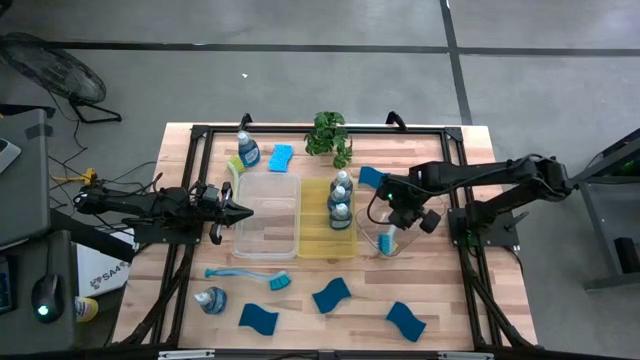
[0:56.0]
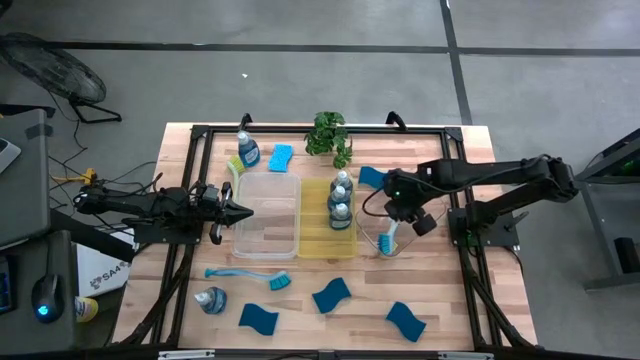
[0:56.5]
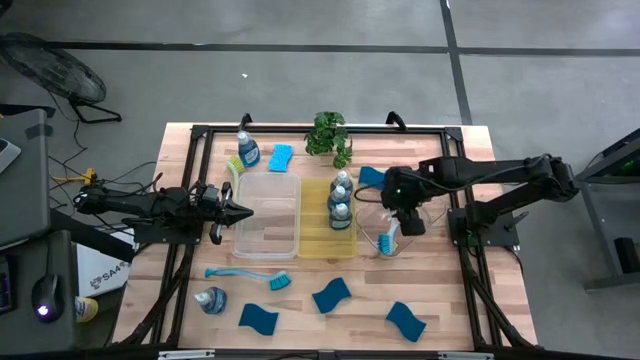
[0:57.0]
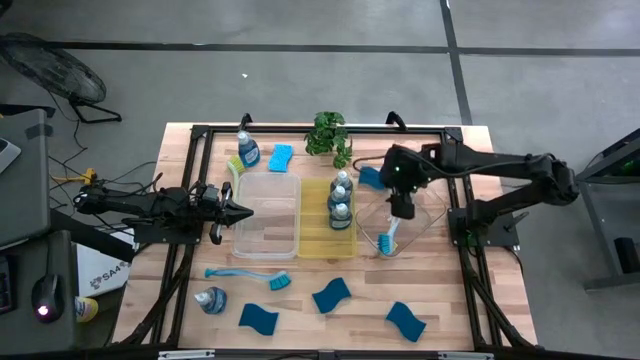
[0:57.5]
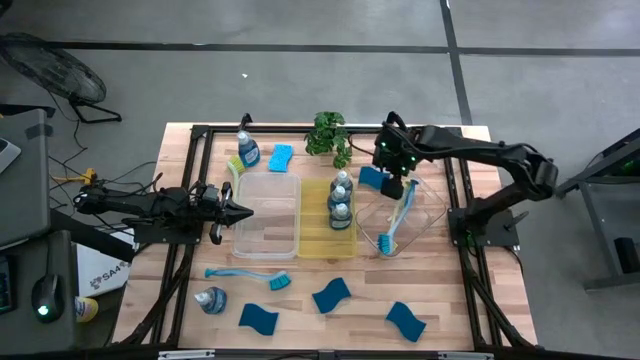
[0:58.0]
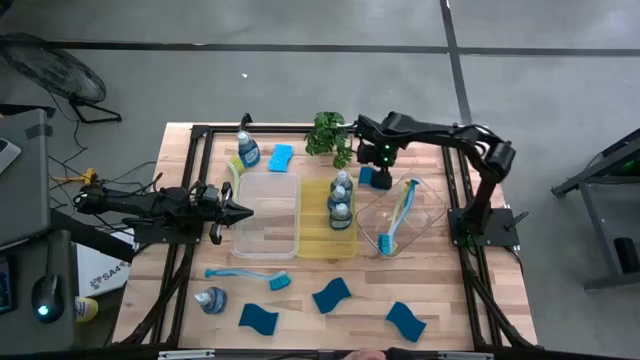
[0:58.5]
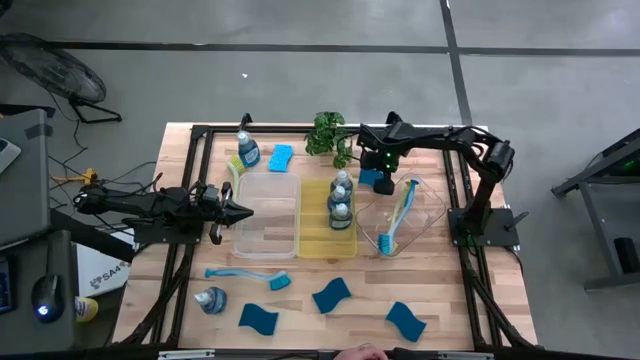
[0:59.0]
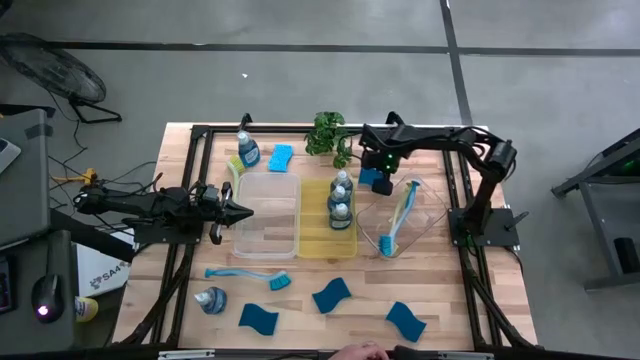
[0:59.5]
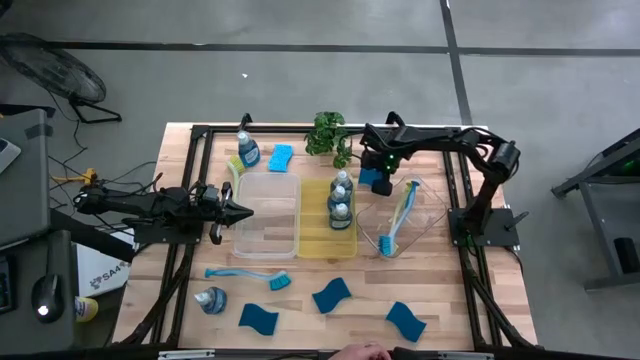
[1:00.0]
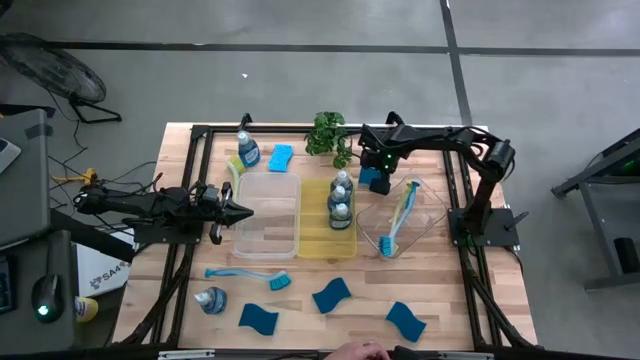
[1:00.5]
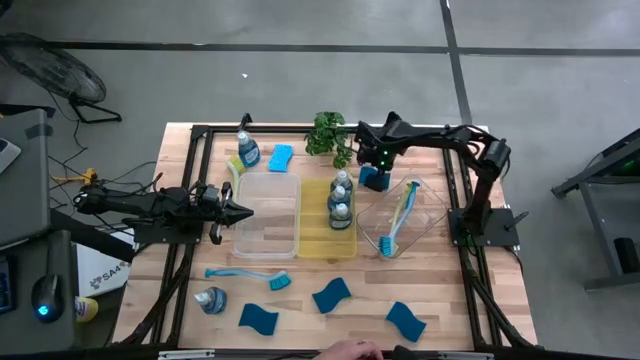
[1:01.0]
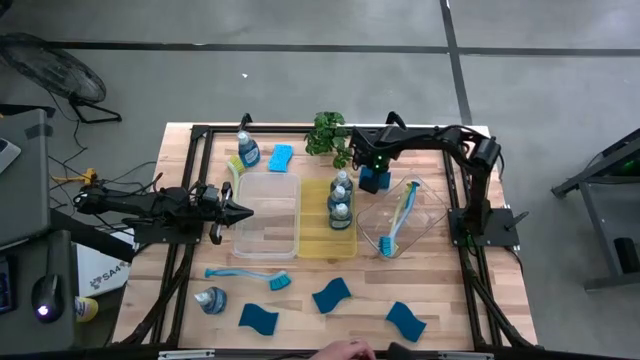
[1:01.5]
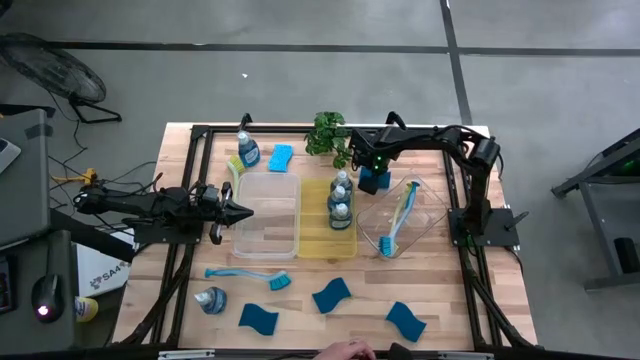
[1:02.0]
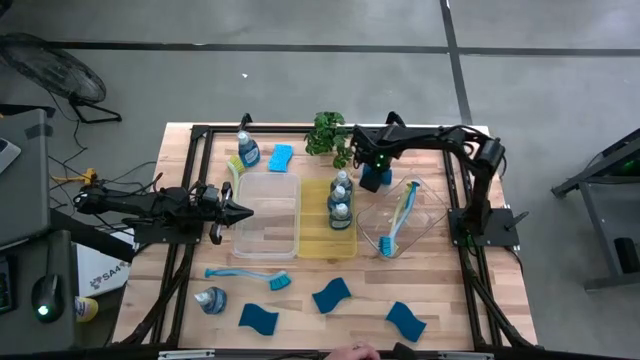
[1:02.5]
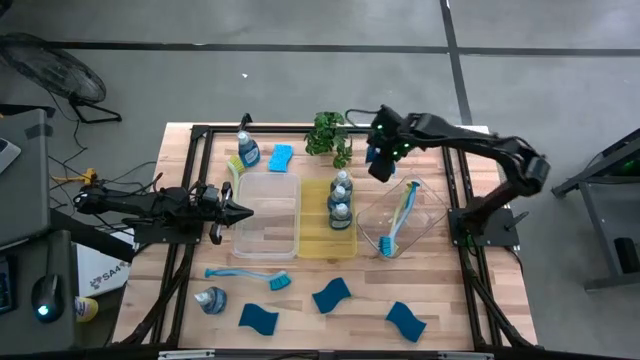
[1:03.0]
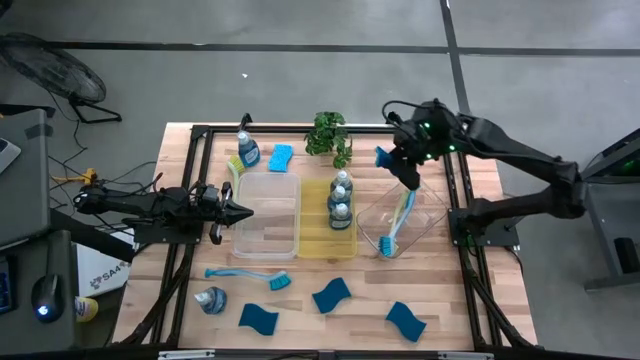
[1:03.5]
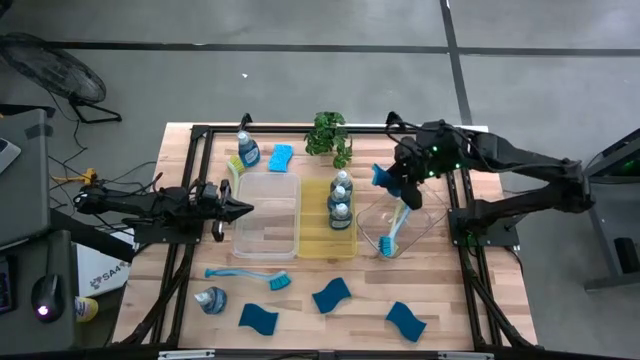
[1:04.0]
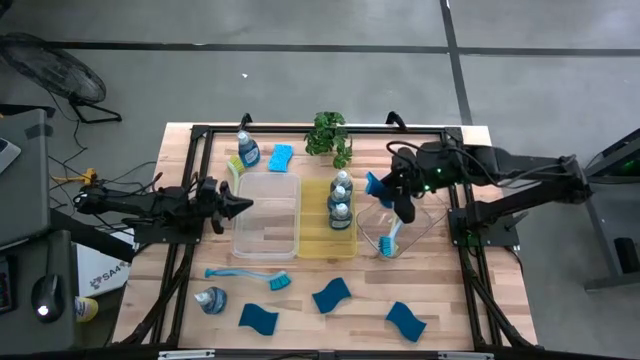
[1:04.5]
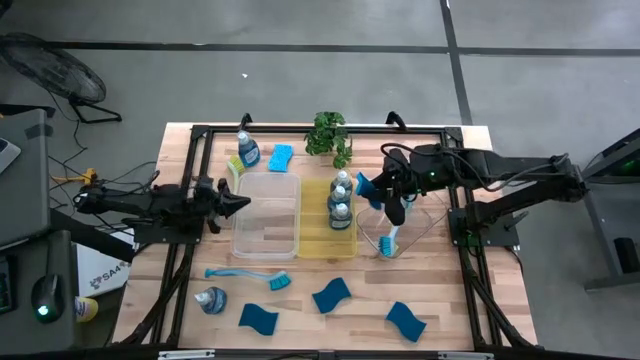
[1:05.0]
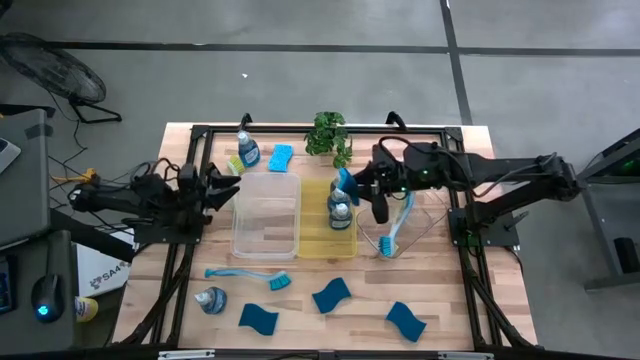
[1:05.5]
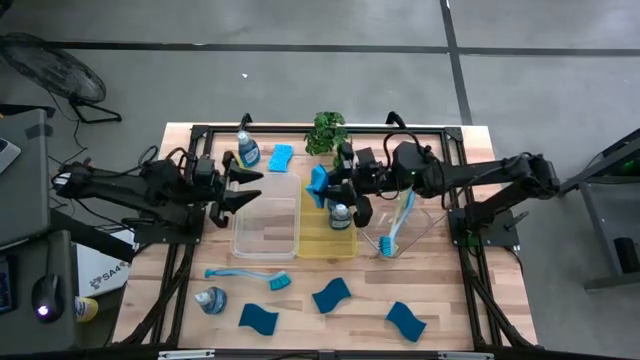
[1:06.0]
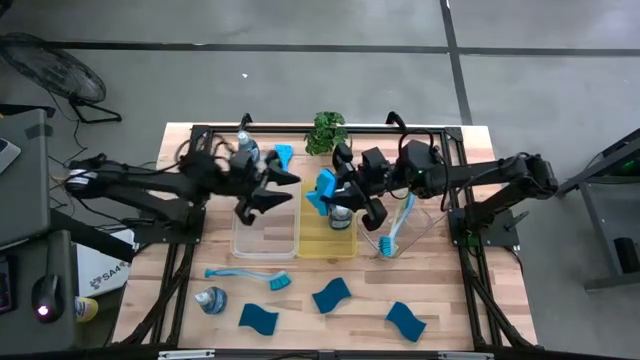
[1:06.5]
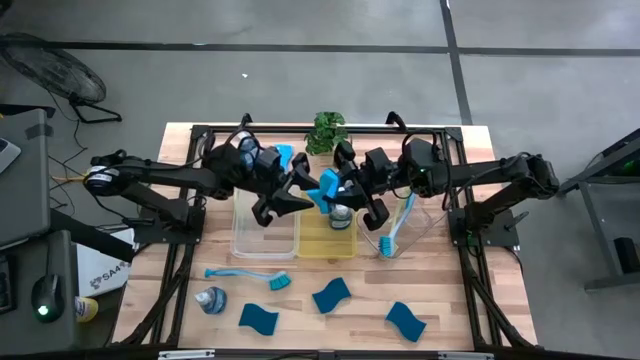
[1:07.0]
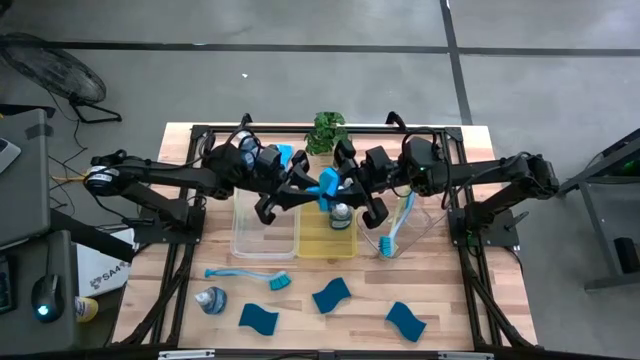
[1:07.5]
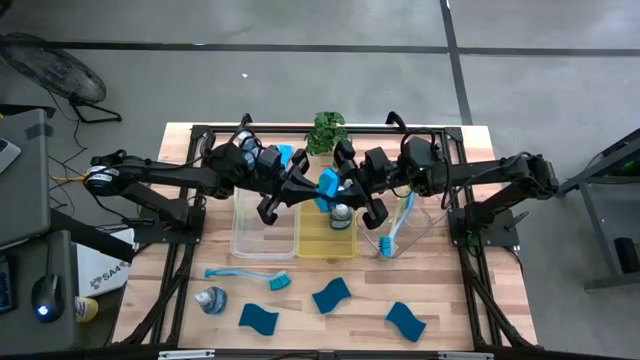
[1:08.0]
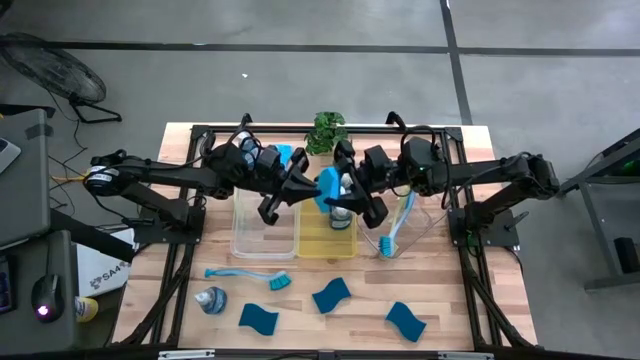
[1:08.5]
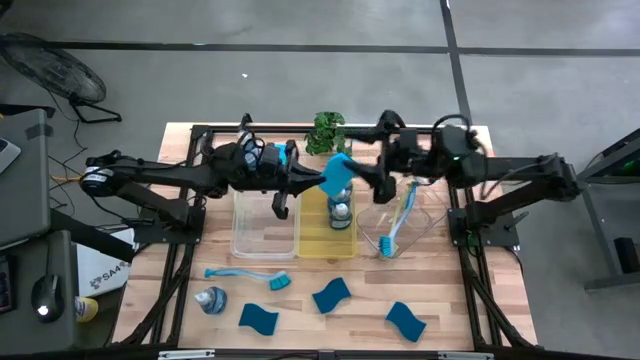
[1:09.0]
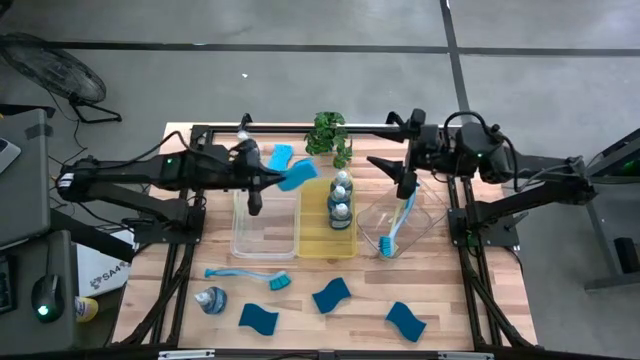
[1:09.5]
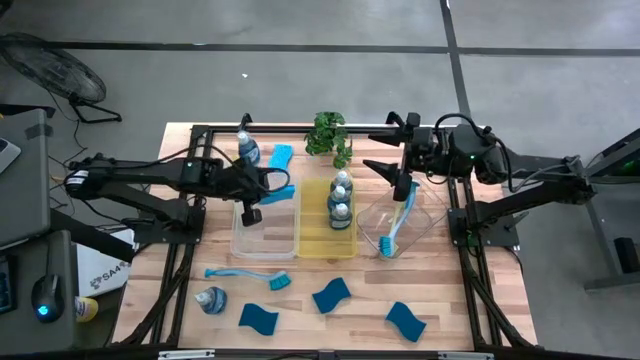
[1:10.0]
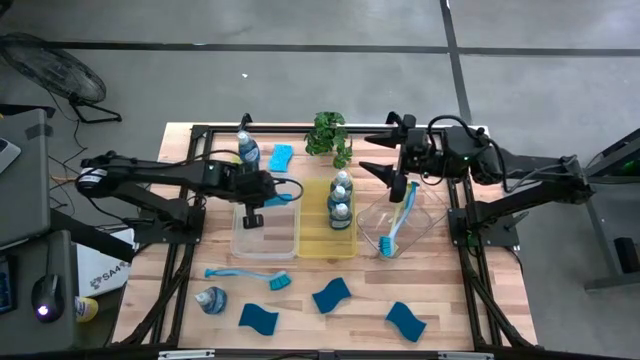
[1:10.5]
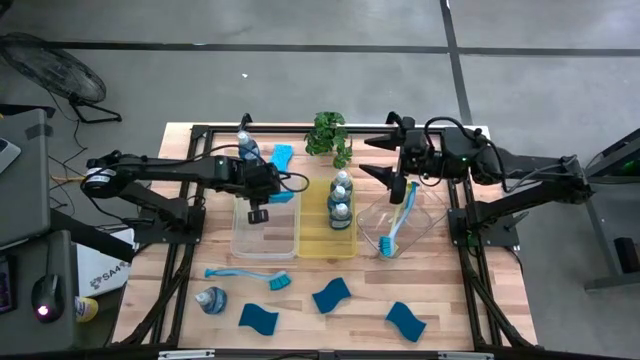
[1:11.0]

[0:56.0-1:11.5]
Task: Pick & Place Kitchen Sink Supplies
Put the blue sponge into the white bin

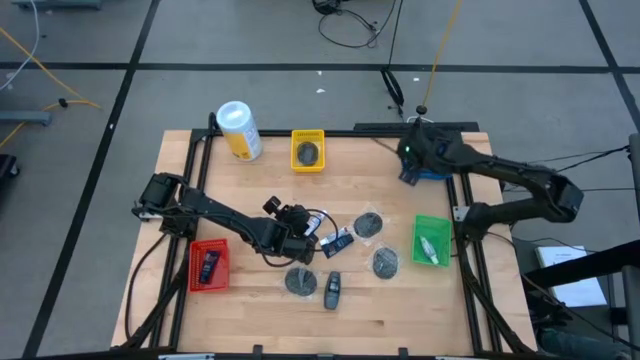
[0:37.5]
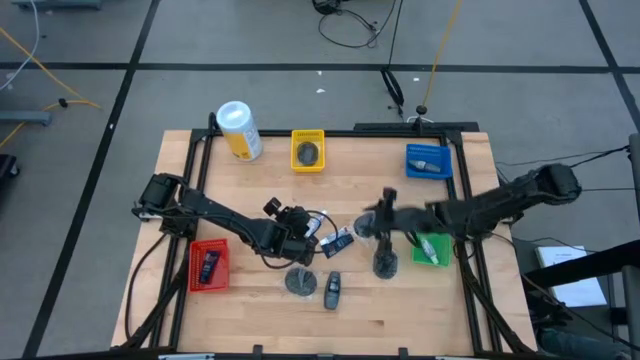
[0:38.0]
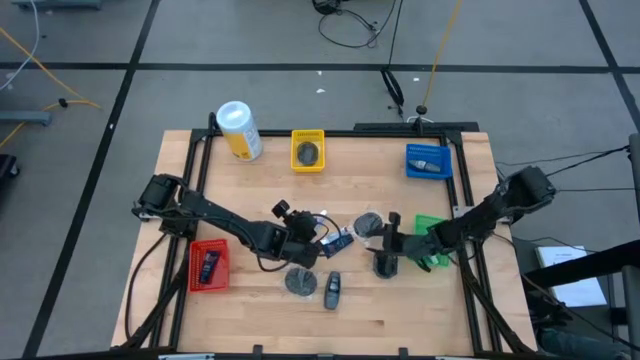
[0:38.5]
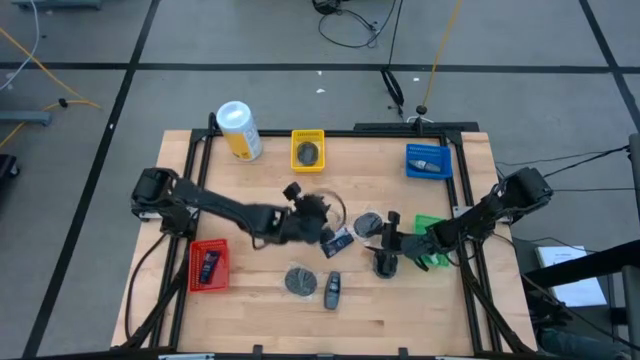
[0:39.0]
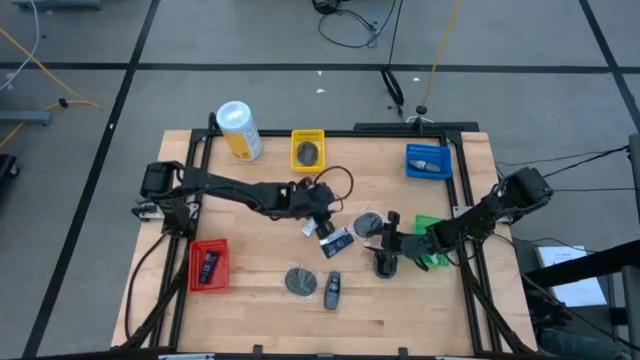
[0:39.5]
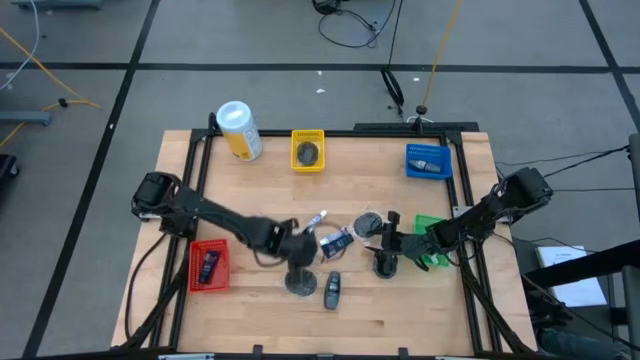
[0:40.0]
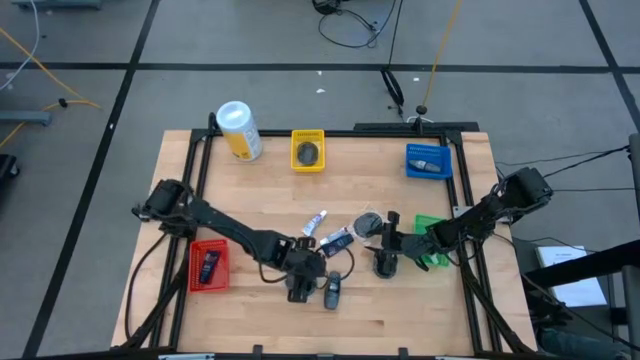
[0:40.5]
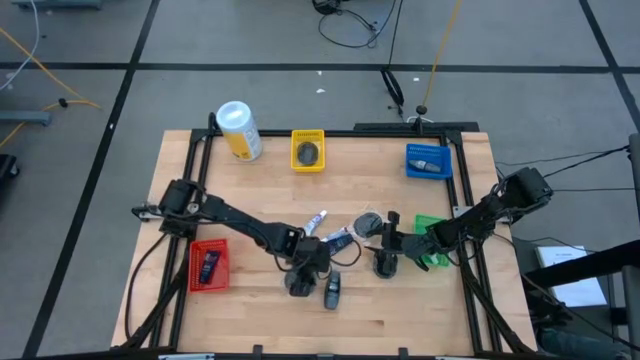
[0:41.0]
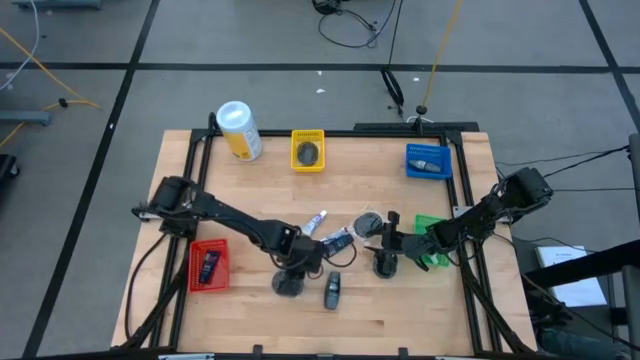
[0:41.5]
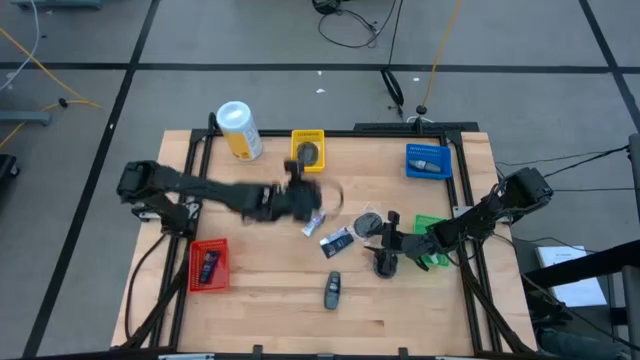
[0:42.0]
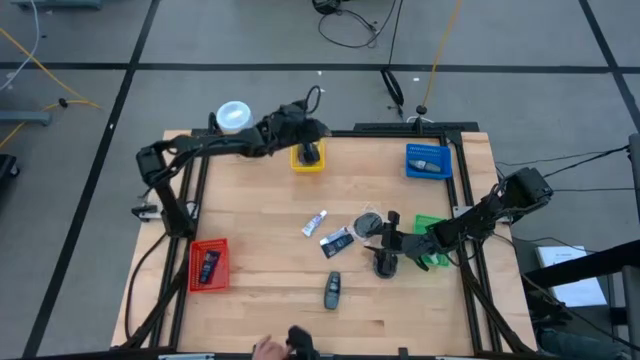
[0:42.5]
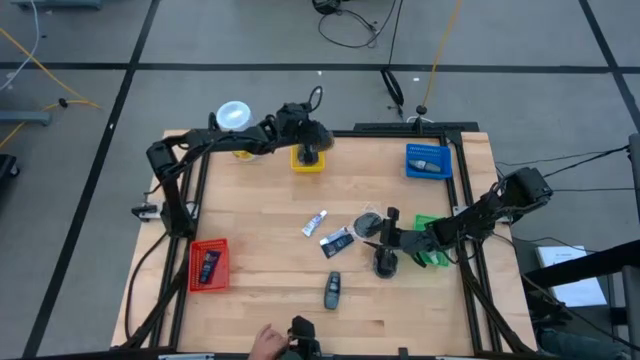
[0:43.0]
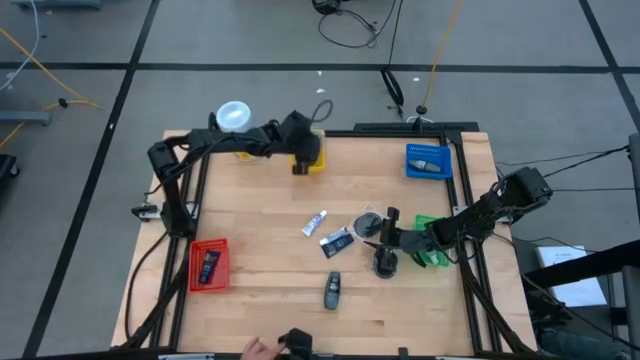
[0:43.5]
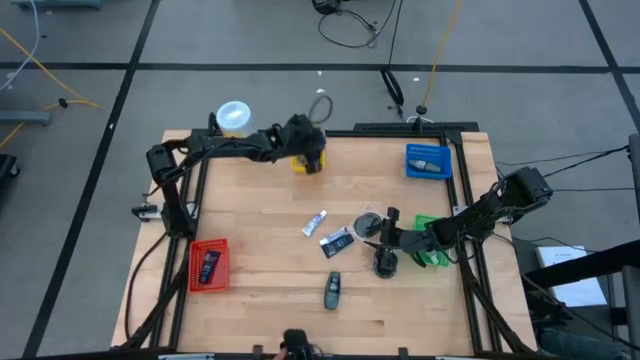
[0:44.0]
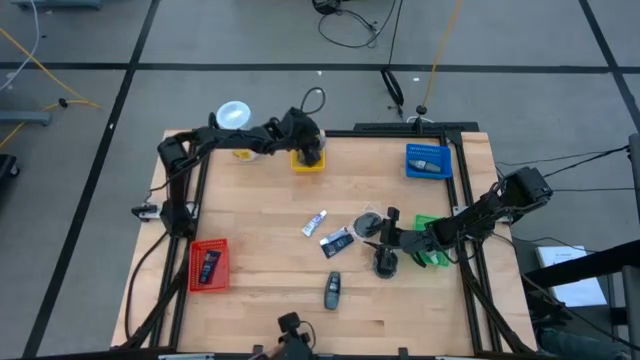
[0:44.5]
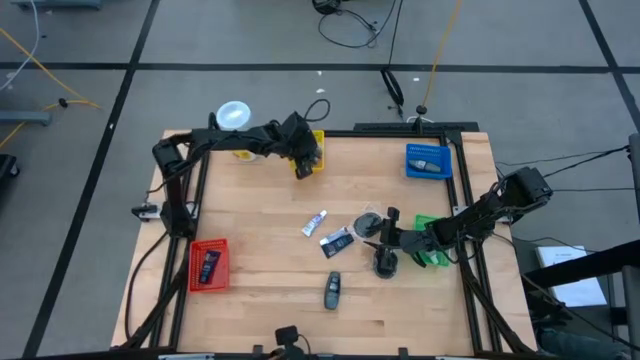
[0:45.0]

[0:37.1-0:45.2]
Task: Pick & Place Travel size toiletries
Put the hairbrush into the yellow bin
